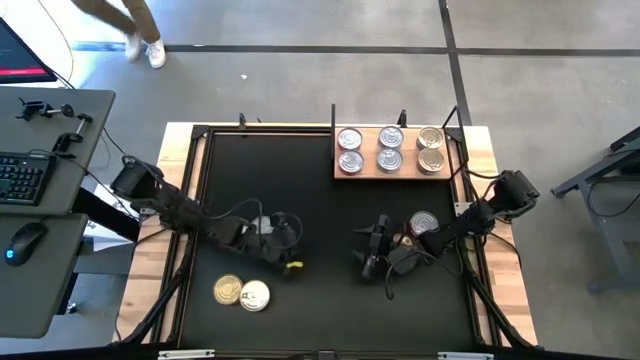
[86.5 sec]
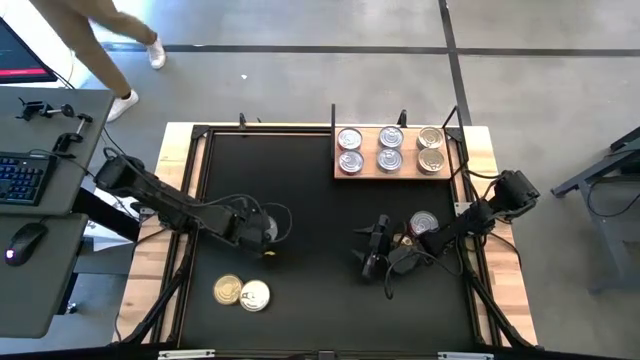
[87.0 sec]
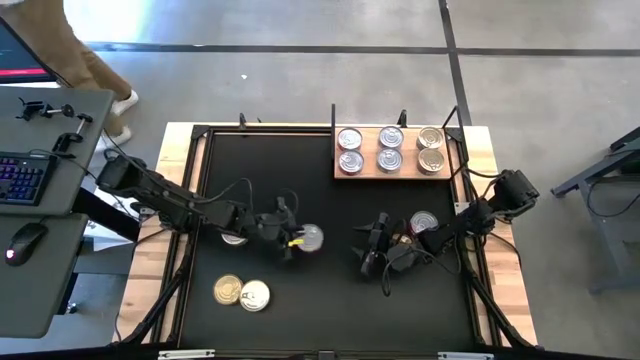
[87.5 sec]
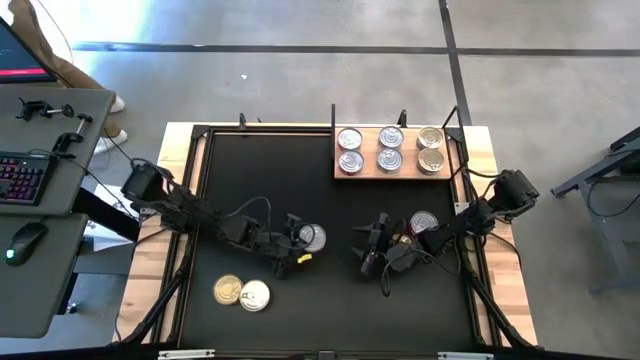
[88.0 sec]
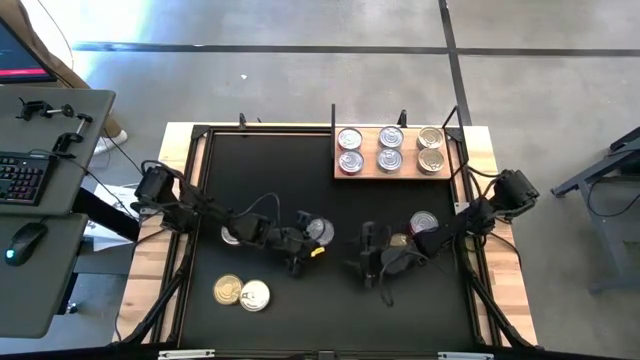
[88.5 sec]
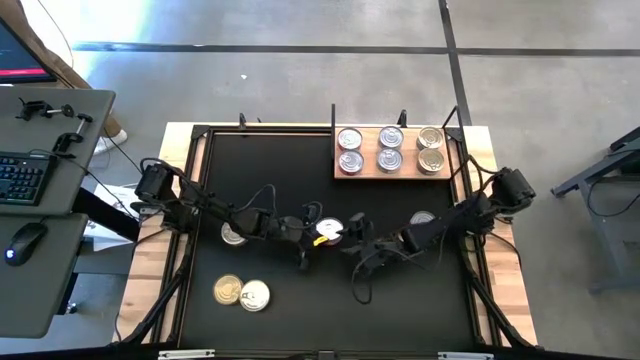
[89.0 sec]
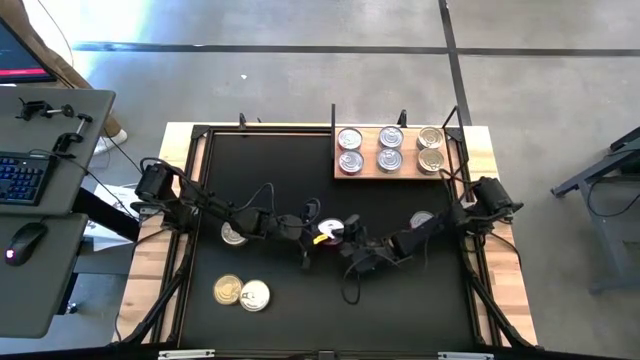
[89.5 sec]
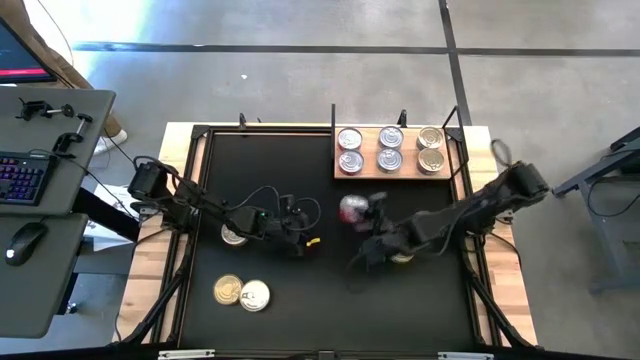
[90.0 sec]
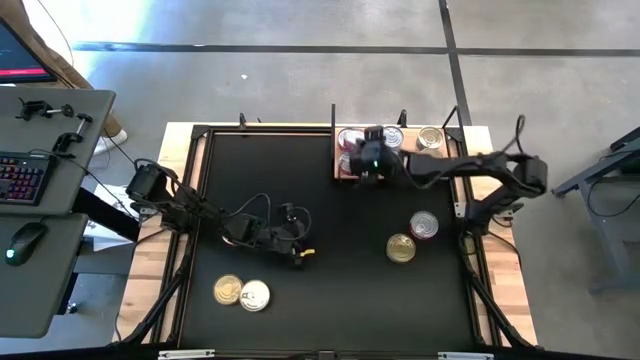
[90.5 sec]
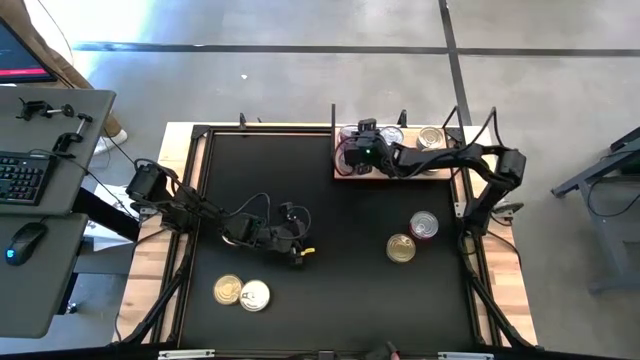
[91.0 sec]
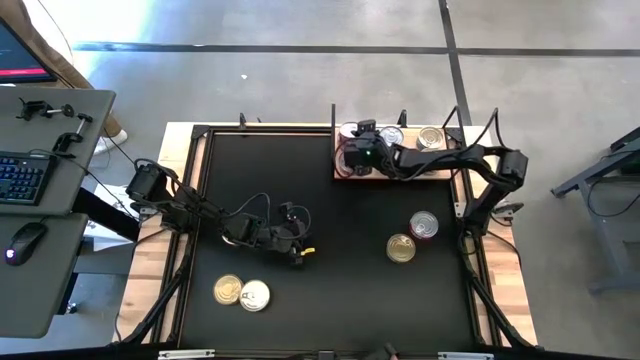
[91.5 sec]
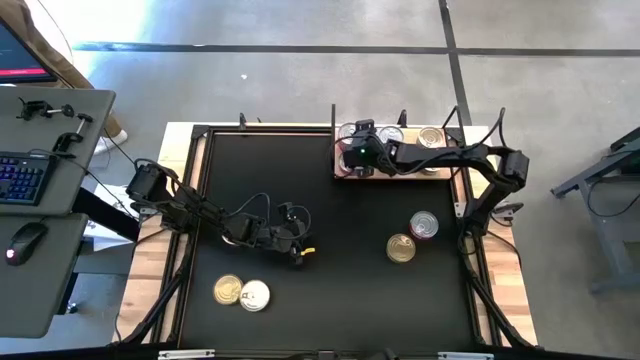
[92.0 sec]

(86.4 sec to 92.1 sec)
Task: Stack canned seafood by type on shelf
Stack the red tuna can on top of the upper red tuna can on the shelf

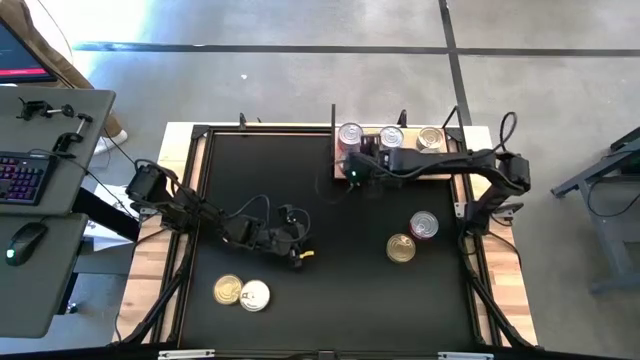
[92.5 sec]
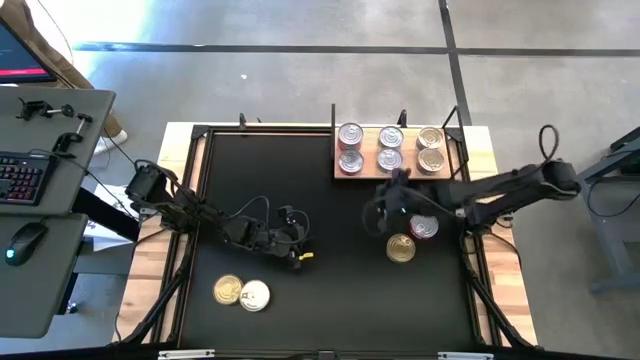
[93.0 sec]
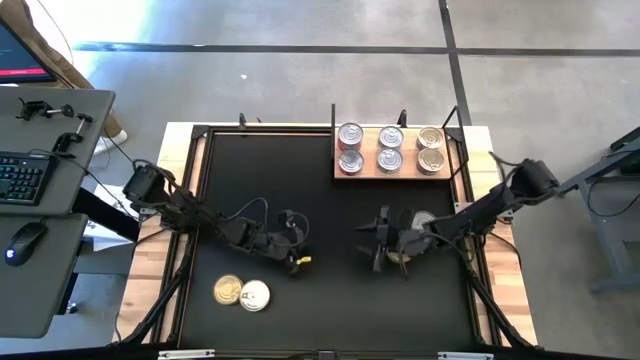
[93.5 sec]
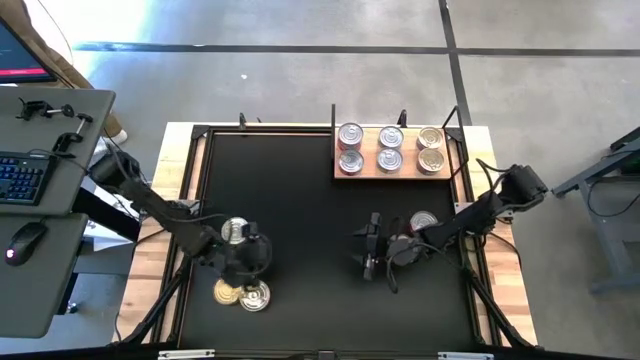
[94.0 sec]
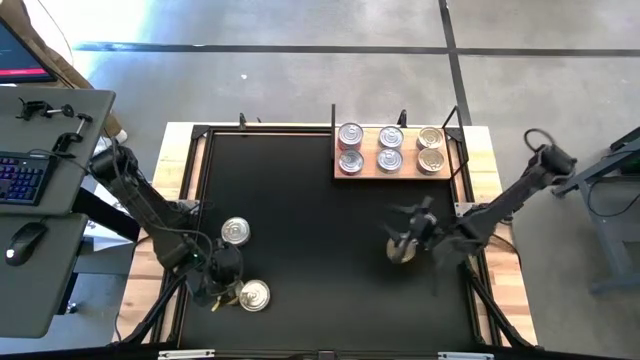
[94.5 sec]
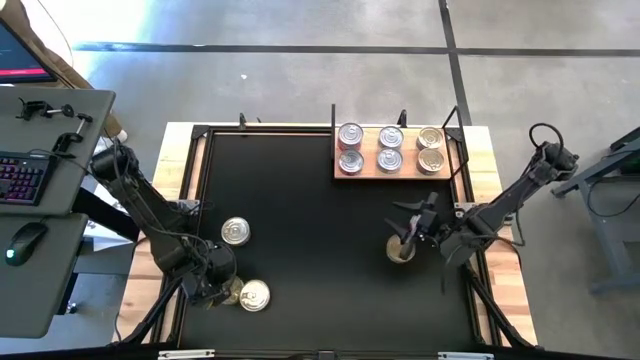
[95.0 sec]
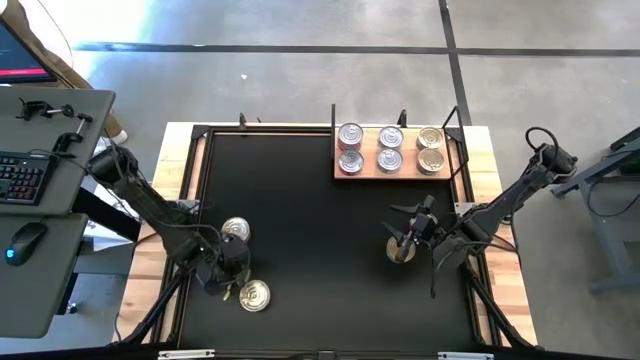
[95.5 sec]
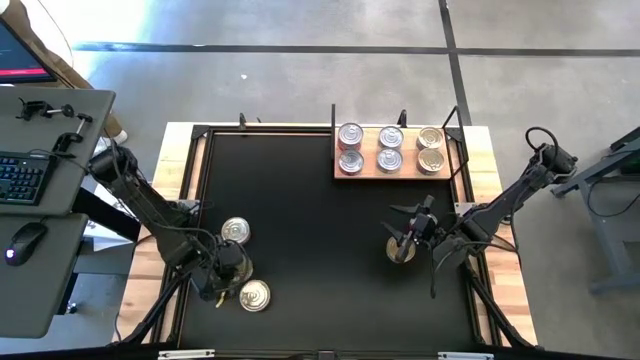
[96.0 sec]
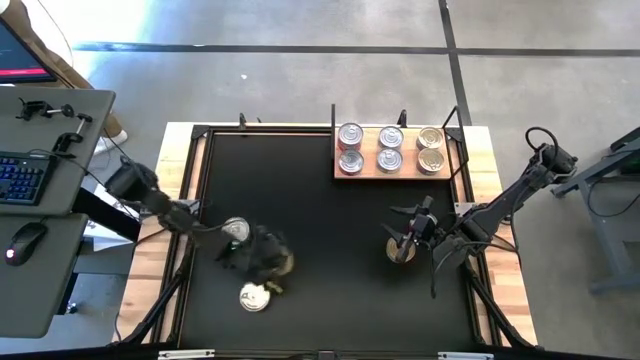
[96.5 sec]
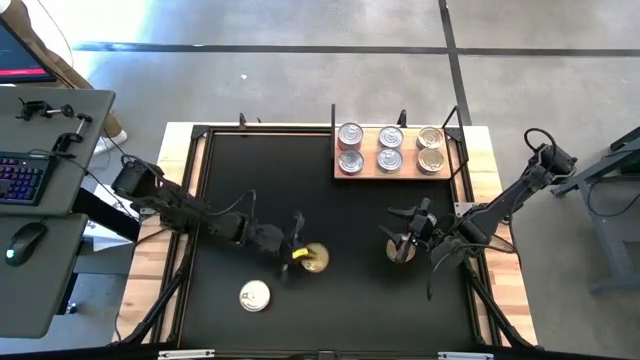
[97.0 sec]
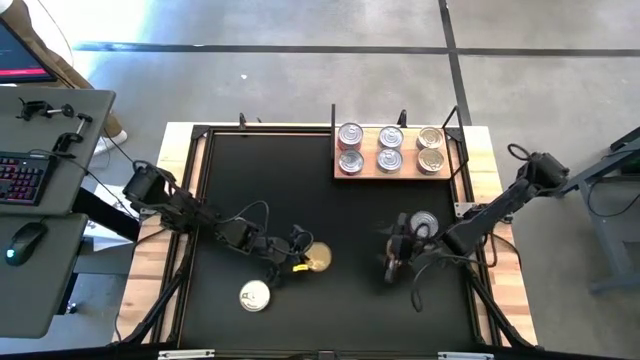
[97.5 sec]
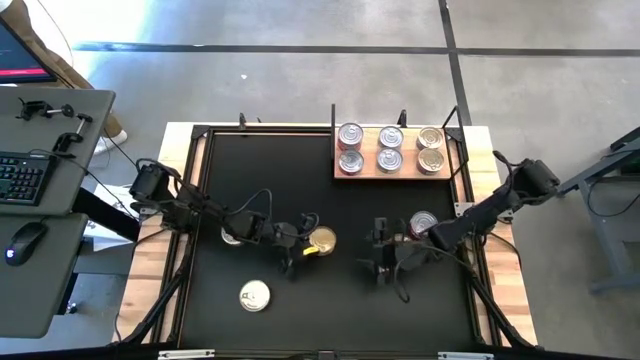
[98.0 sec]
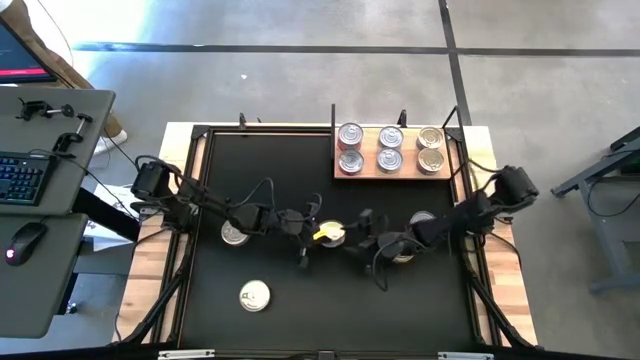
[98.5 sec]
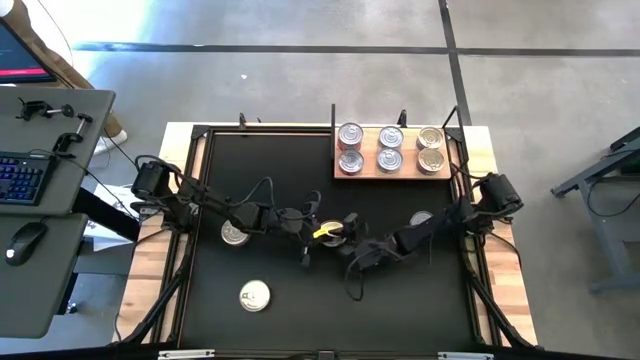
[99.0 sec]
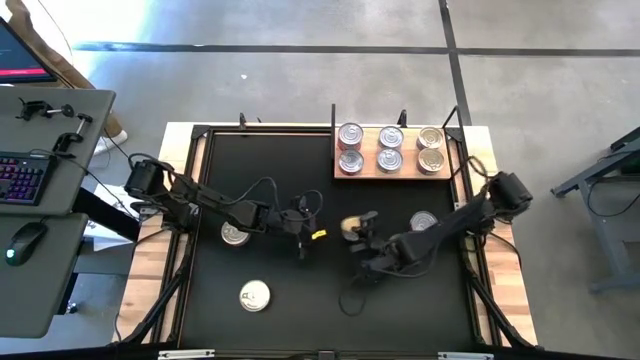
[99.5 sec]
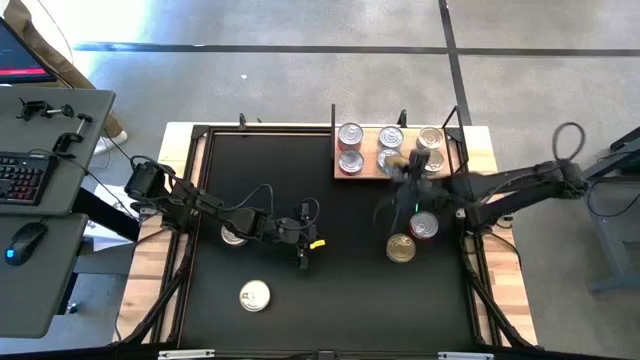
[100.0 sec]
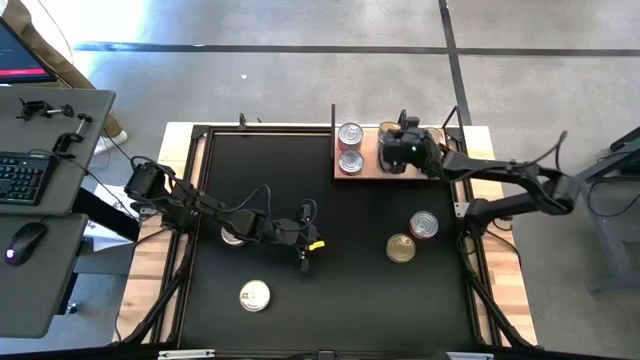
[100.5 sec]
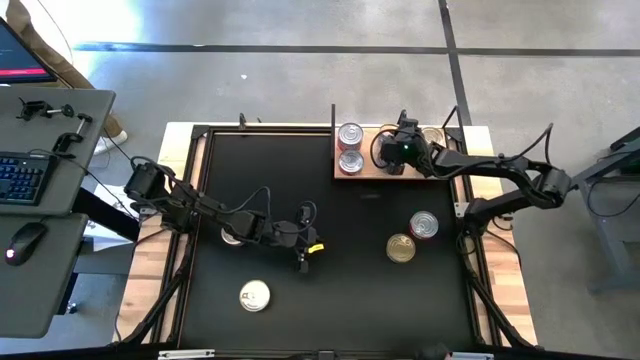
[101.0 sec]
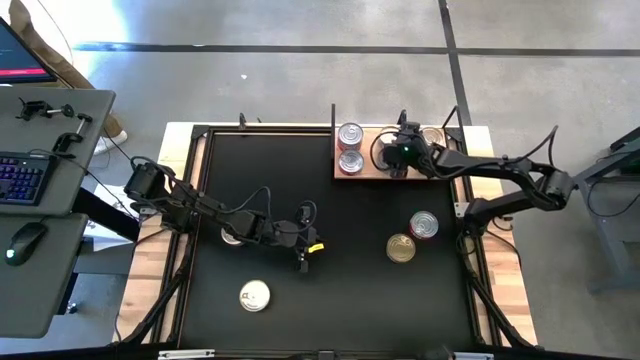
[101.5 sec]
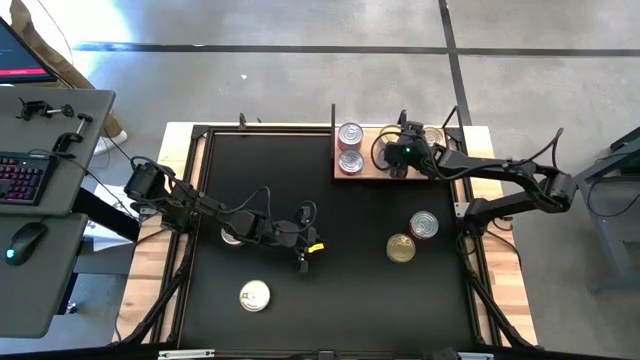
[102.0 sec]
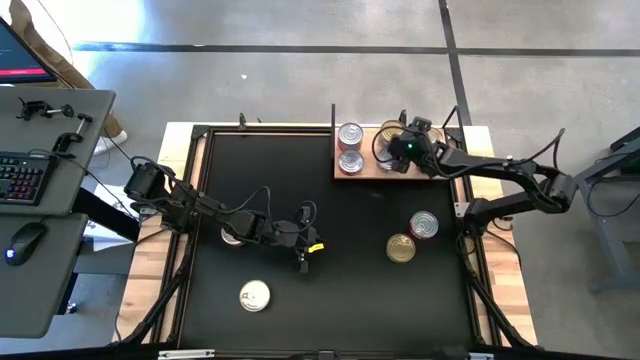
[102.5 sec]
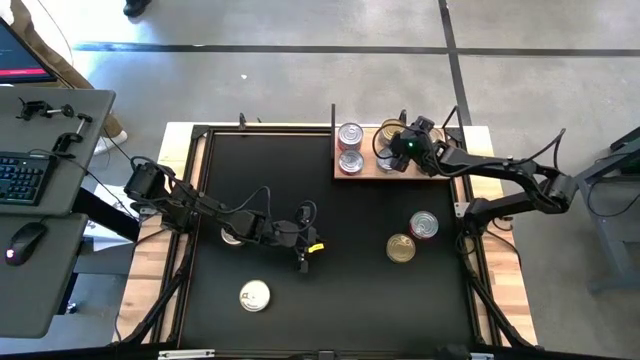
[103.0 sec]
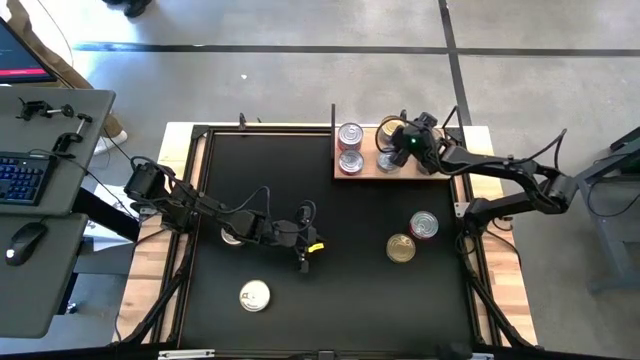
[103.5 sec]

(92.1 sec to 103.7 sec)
Stack the green tuna can on top of the upper green tuna can on the shelf

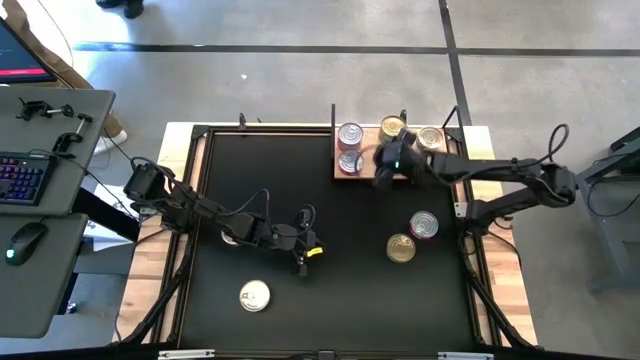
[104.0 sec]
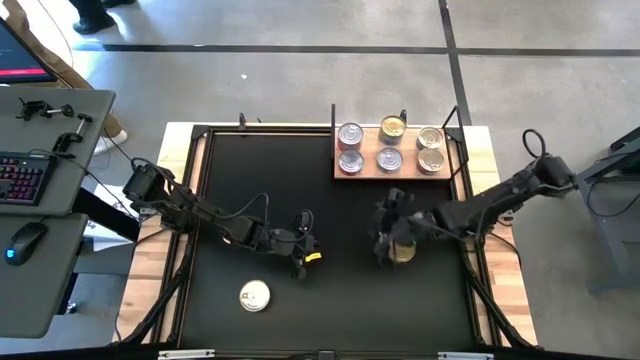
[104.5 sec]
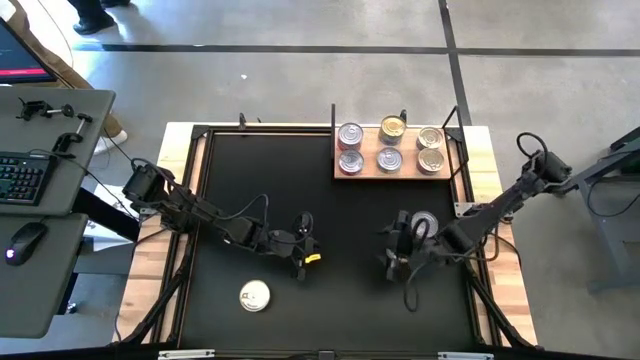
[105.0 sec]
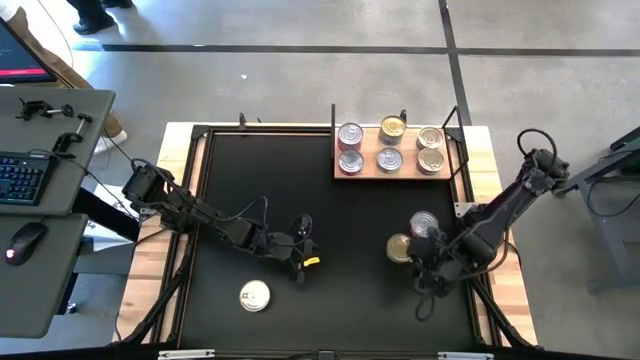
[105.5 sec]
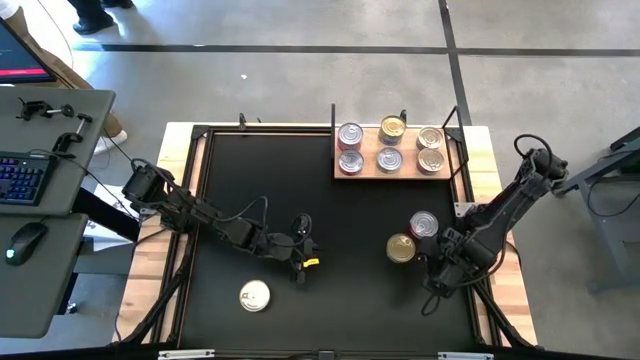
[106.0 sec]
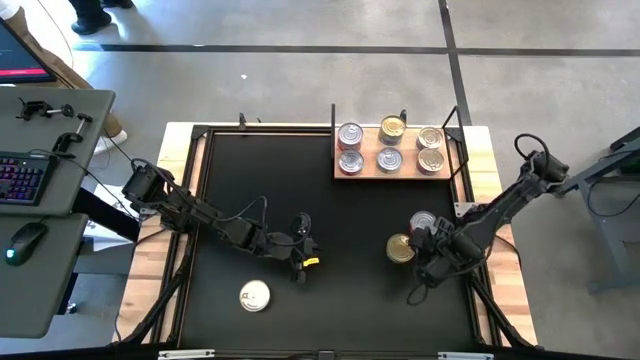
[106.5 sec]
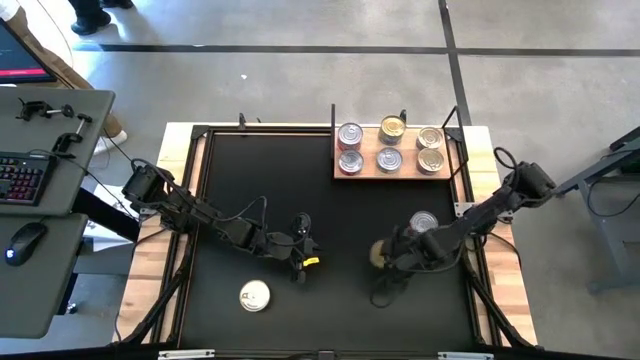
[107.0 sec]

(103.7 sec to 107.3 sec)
Move the green tuna can to the center of the table
